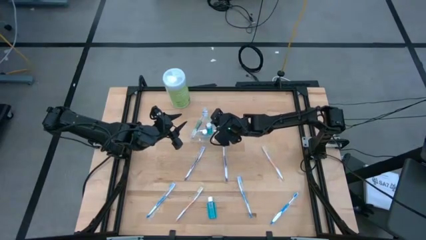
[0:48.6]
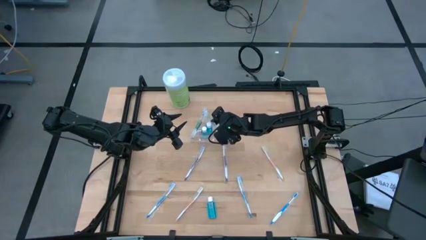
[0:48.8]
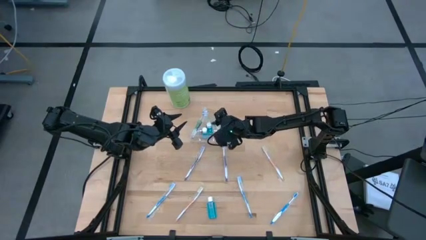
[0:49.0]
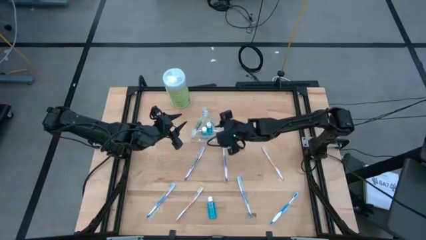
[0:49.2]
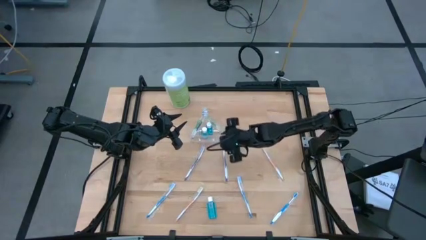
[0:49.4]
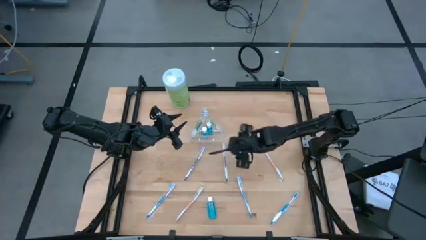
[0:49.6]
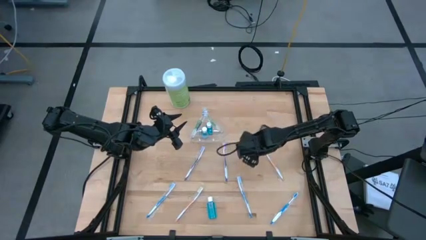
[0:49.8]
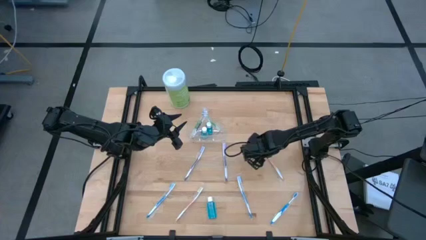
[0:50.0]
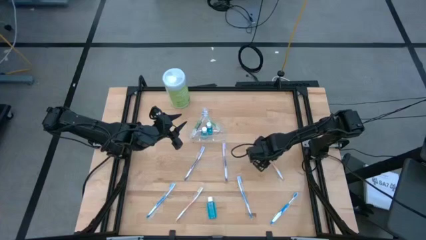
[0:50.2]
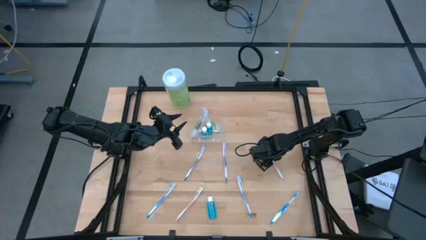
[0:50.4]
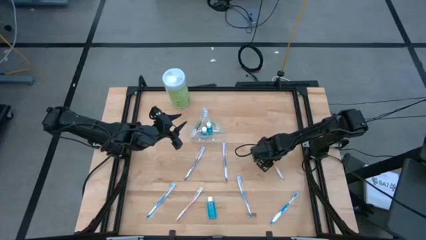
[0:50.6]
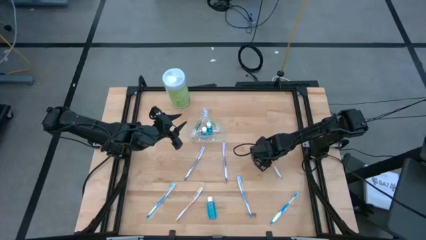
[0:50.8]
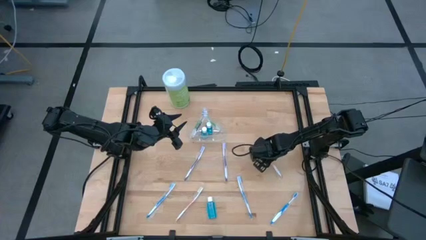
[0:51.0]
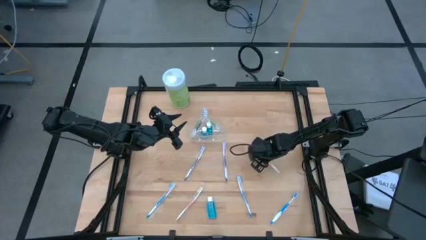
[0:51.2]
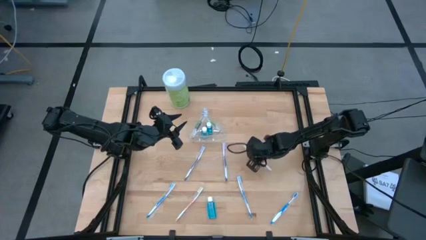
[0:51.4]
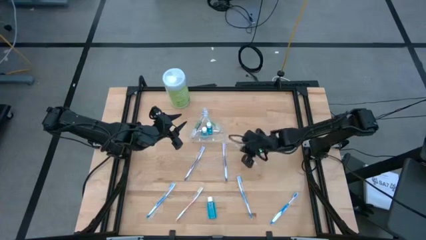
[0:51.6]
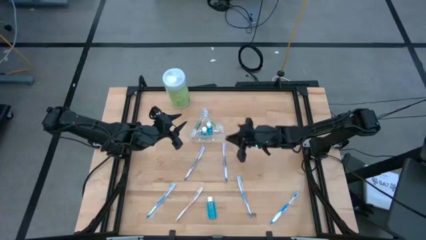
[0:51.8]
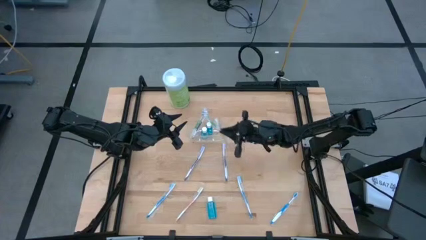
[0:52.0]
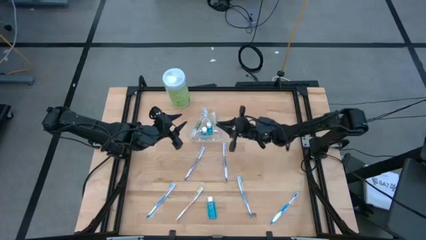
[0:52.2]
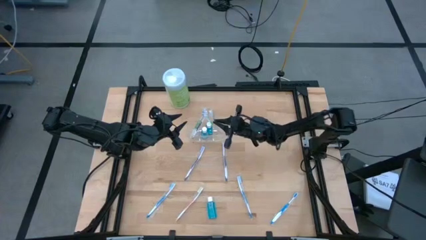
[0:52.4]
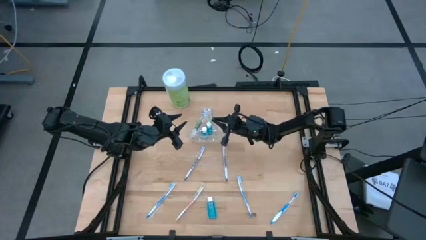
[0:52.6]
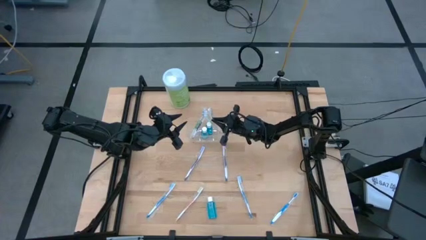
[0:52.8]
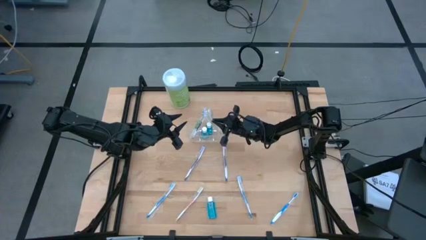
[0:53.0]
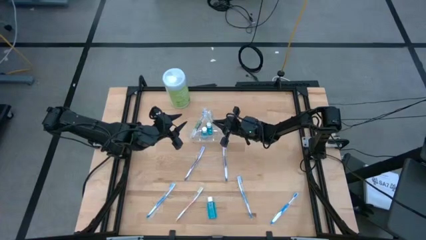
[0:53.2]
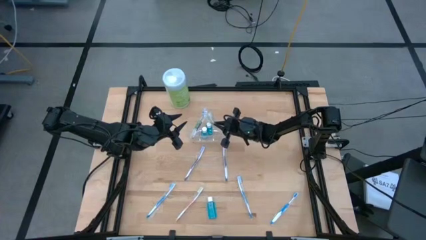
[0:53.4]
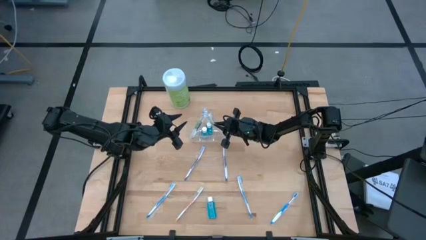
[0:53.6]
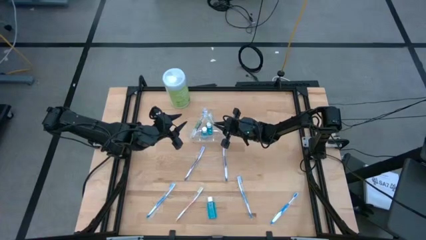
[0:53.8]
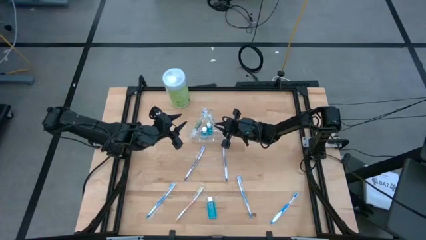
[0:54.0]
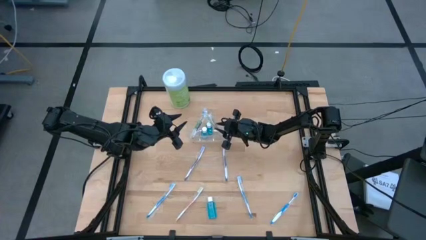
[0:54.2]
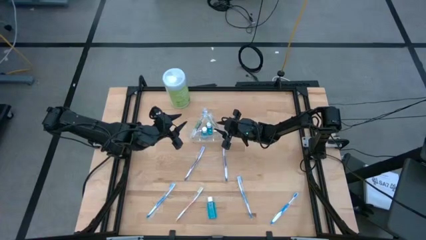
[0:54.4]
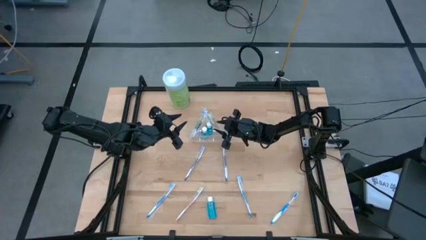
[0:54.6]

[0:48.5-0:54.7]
Task: Pick & Place toothbrushing station
Put the top orange toothbrush into the transparent organizer

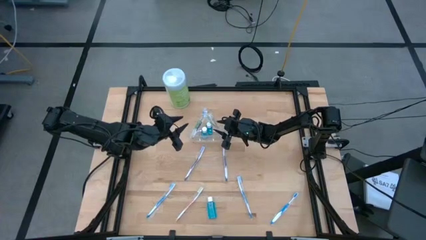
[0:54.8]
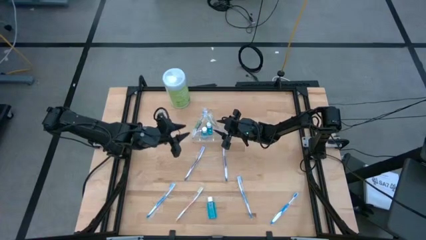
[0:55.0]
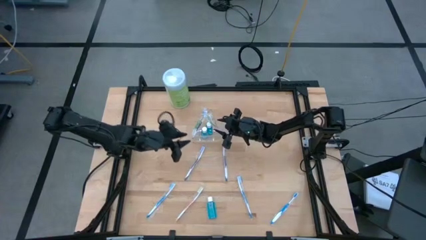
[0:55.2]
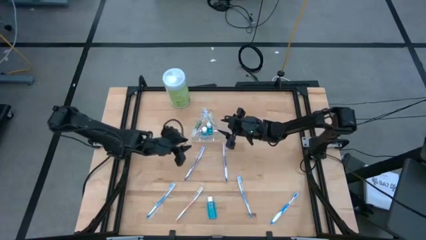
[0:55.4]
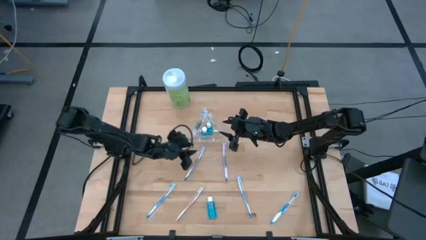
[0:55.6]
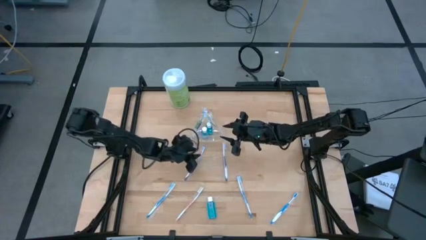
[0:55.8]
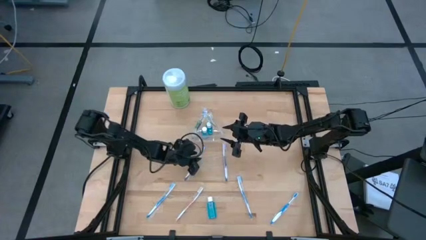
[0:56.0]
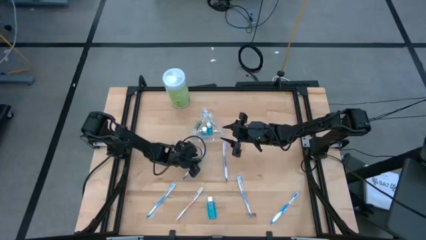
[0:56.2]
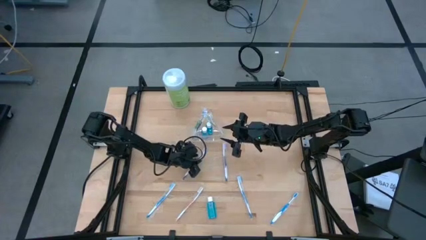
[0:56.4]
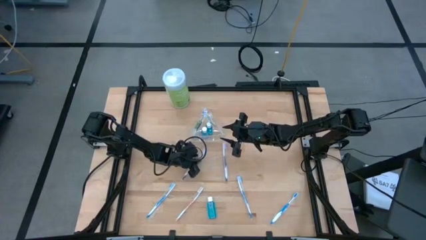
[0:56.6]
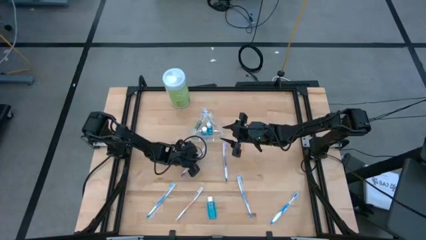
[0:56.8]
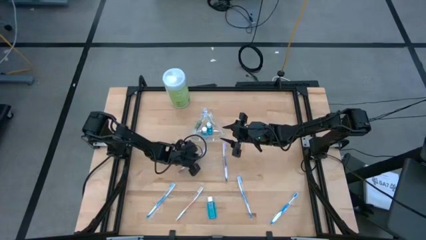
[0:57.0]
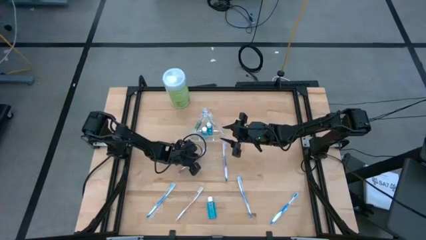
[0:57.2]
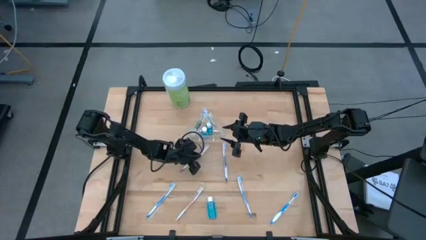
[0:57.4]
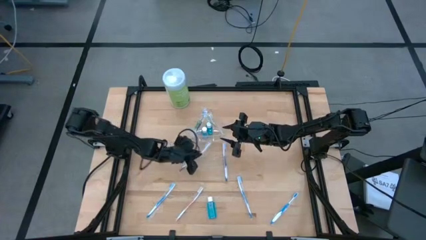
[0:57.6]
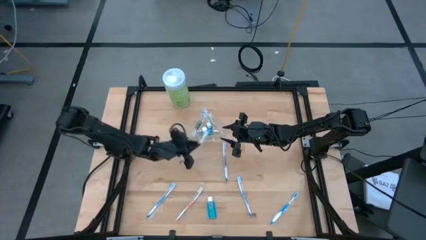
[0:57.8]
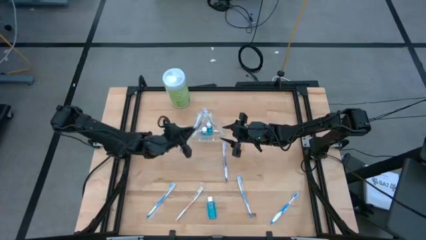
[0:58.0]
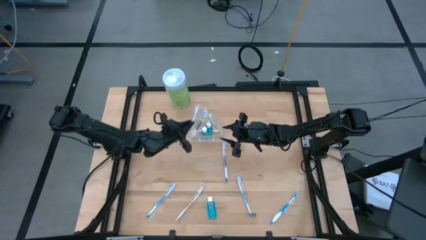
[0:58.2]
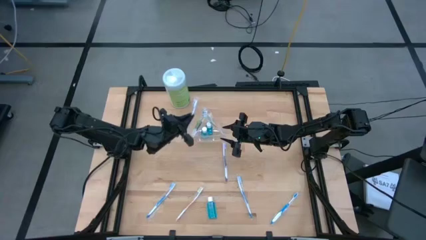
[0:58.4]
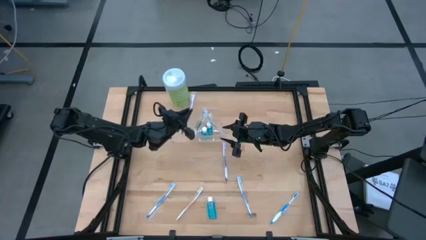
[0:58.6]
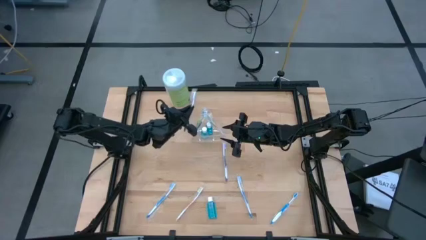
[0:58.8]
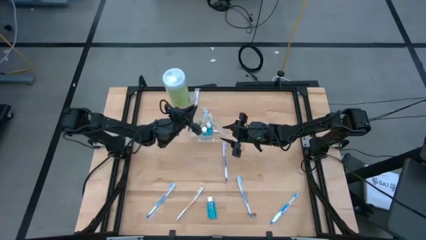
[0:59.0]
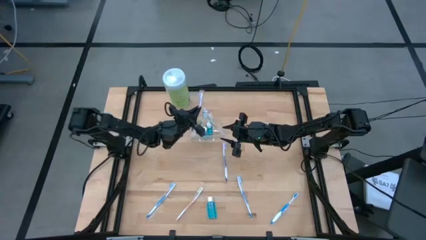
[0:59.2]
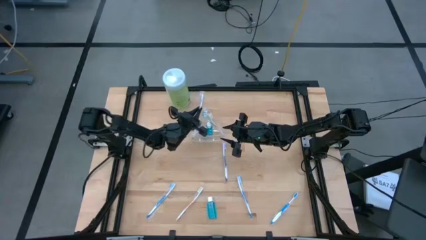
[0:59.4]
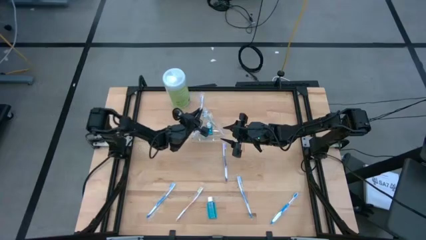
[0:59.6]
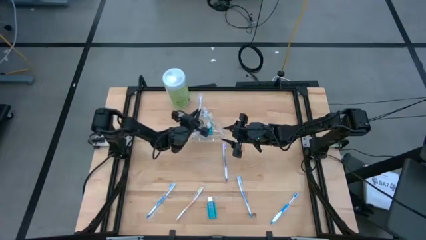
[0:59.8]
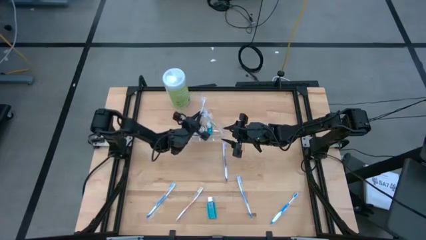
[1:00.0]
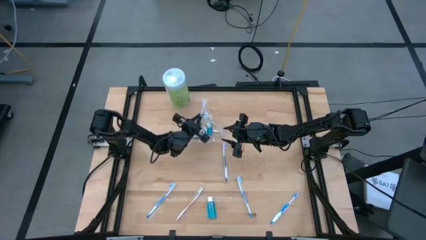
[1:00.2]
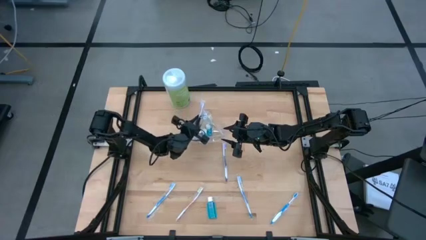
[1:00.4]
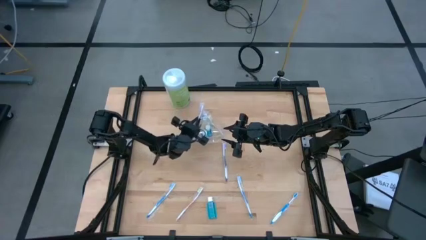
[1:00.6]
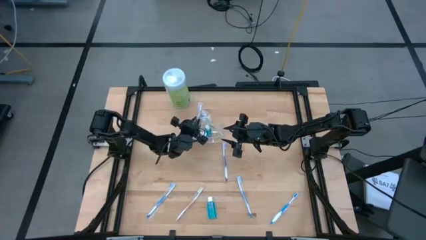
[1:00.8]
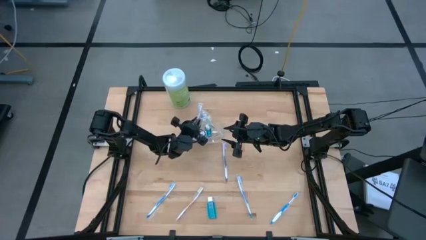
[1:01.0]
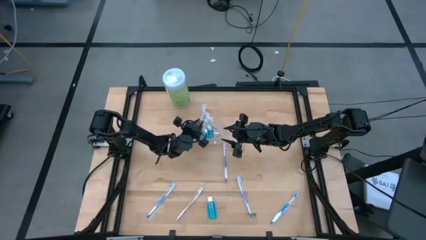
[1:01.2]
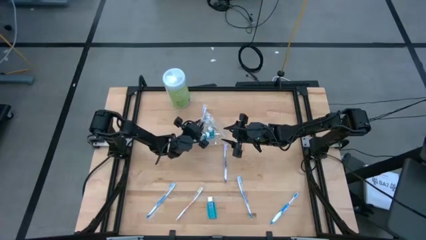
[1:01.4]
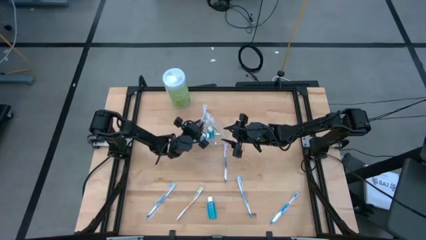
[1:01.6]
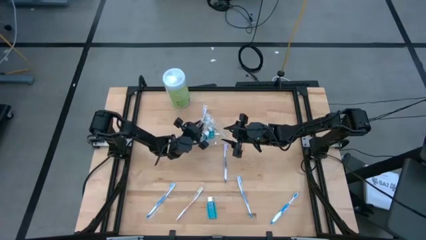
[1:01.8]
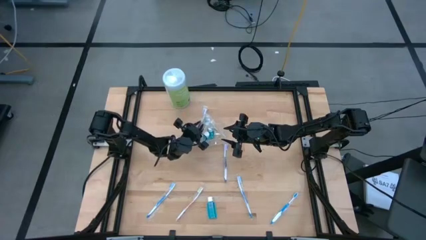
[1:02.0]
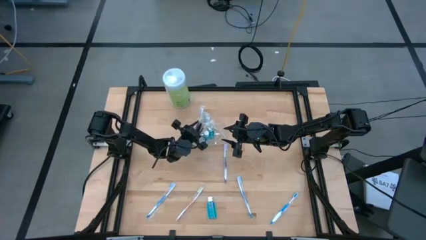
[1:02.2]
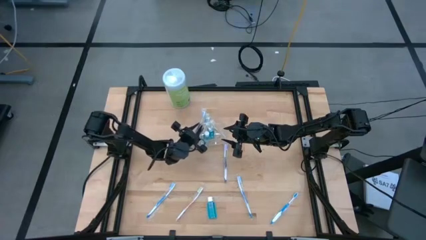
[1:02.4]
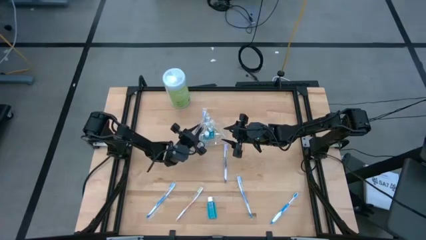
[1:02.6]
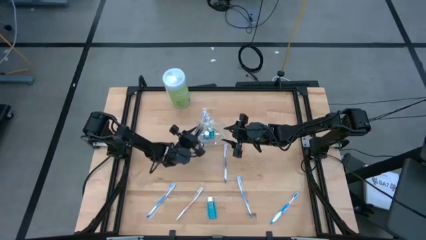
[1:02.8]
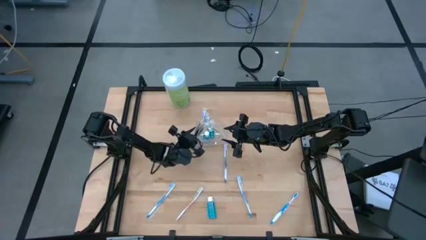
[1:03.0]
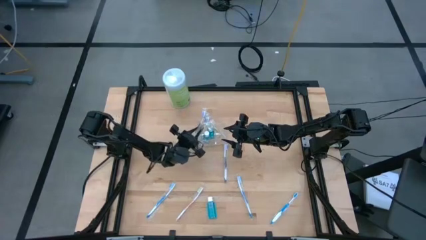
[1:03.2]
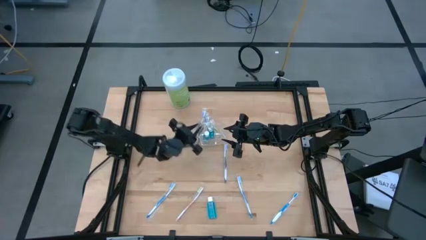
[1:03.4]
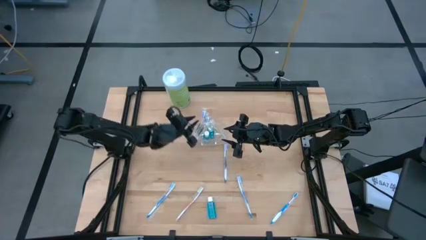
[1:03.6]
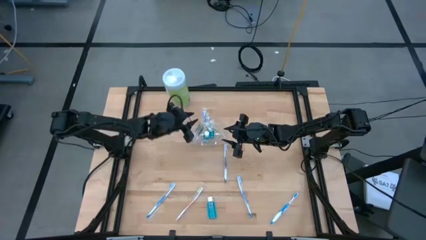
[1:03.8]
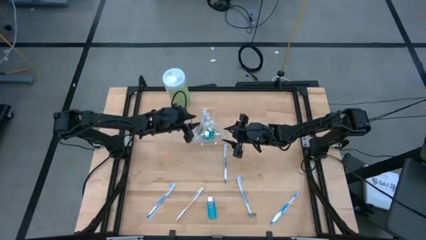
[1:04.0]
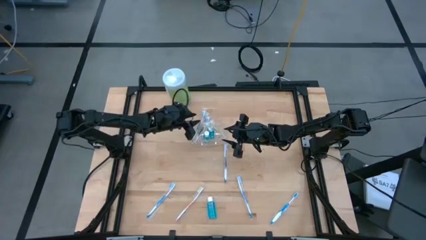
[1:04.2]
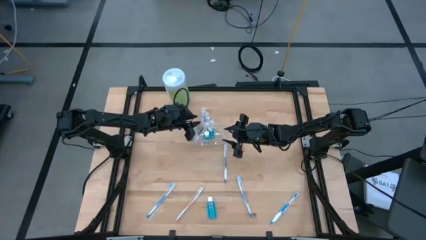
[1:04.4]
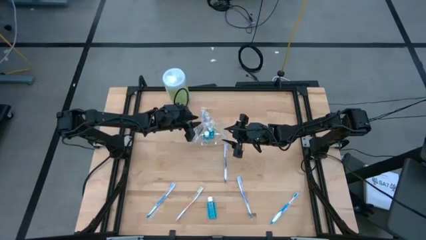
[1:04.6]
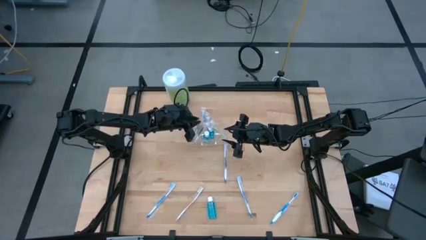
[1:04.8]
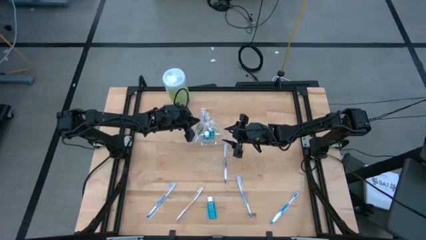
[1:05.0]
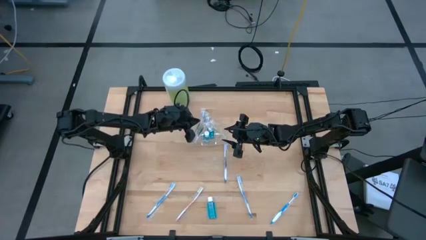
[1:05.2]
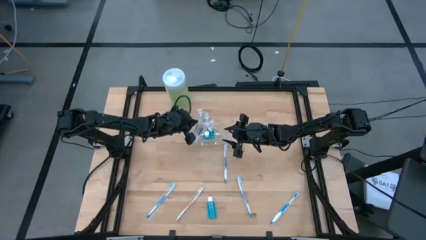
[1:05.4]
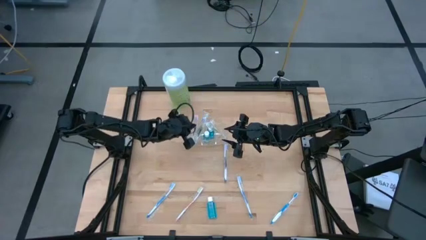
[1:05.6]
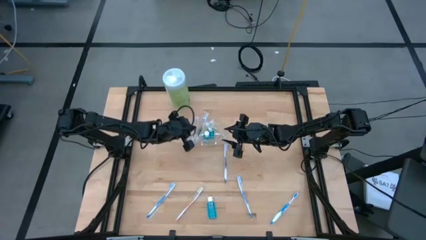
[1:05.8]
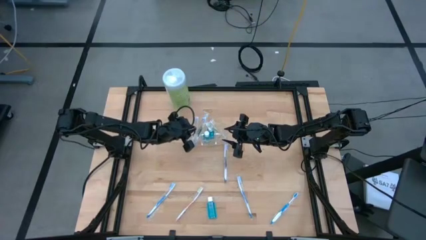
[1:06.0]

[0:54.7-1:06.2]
Put the left violet toothbrush into the transparent organizer
